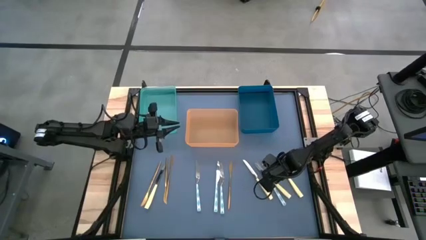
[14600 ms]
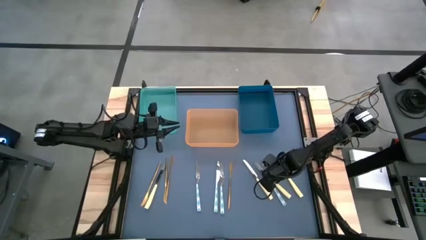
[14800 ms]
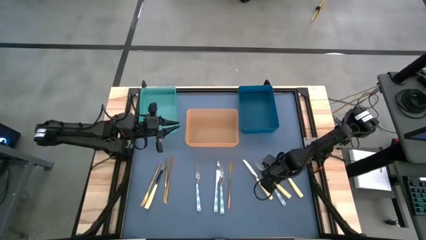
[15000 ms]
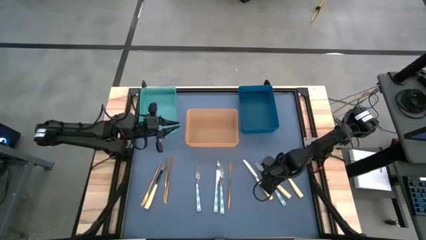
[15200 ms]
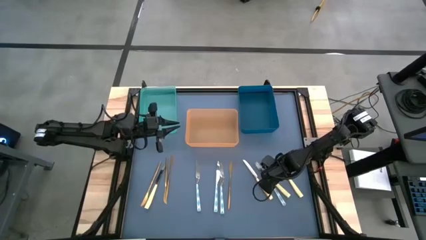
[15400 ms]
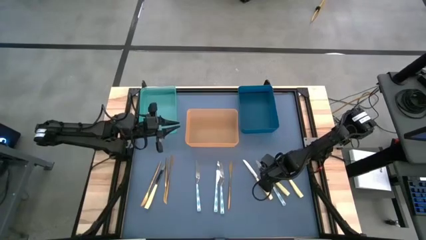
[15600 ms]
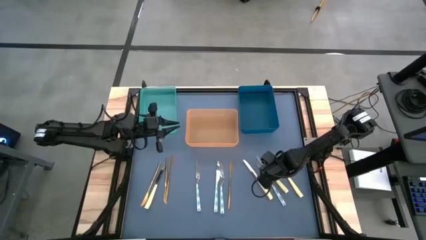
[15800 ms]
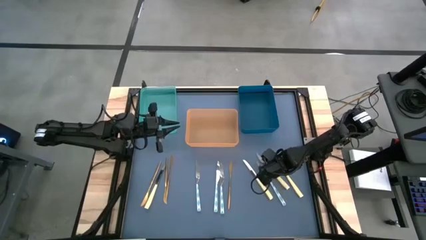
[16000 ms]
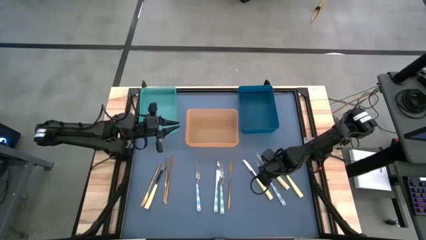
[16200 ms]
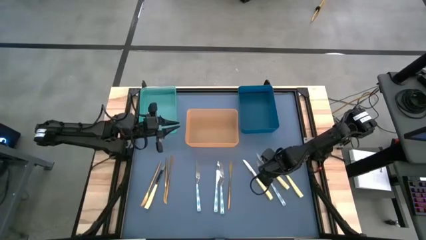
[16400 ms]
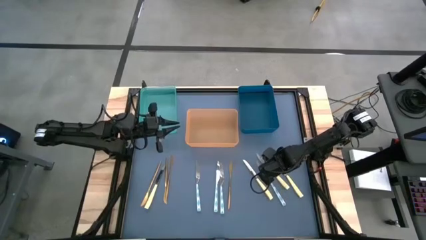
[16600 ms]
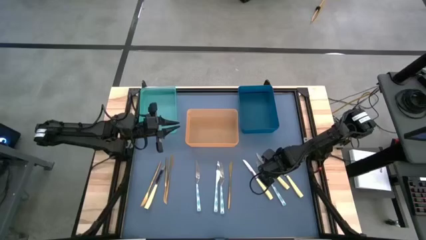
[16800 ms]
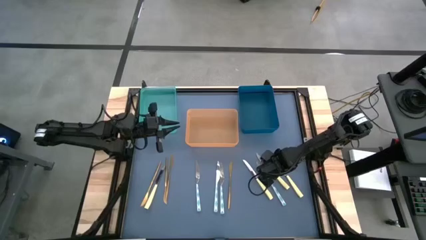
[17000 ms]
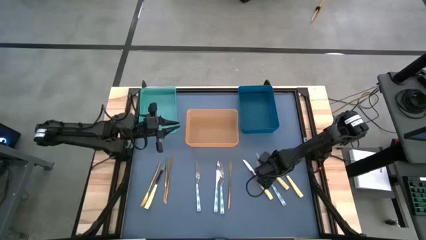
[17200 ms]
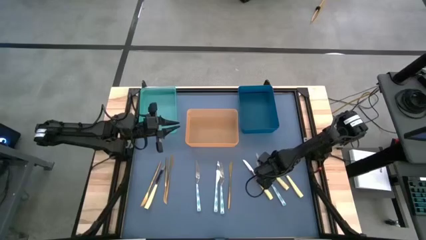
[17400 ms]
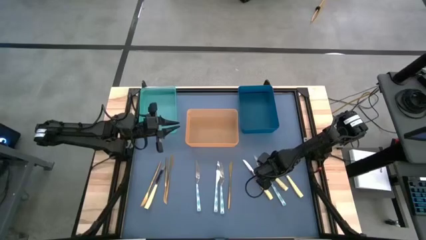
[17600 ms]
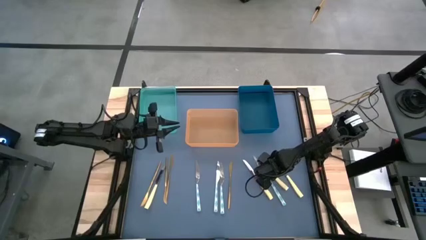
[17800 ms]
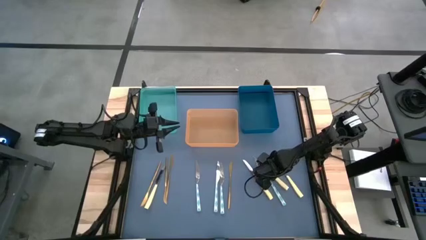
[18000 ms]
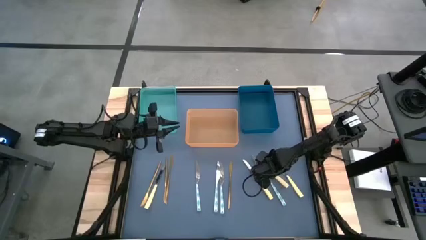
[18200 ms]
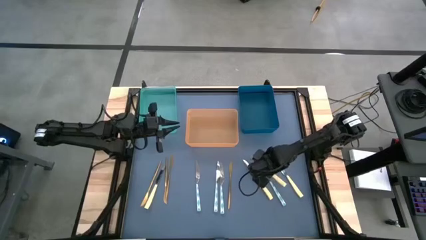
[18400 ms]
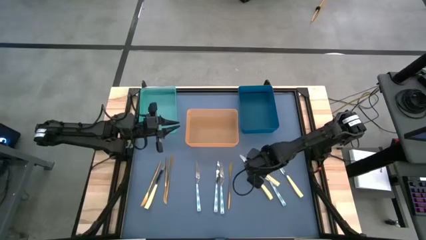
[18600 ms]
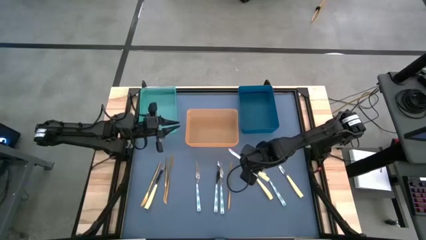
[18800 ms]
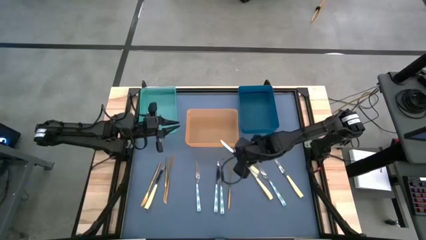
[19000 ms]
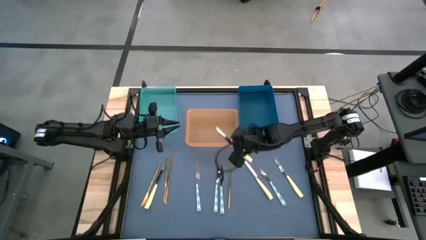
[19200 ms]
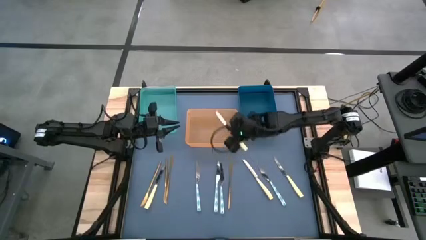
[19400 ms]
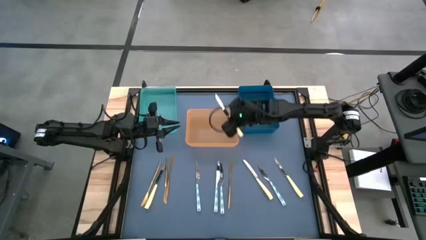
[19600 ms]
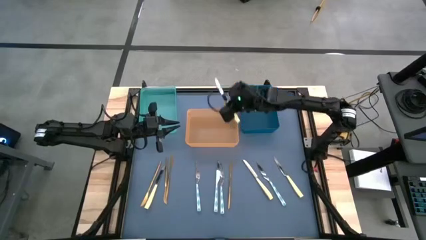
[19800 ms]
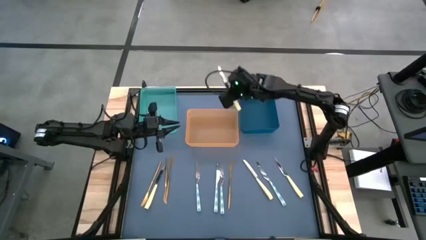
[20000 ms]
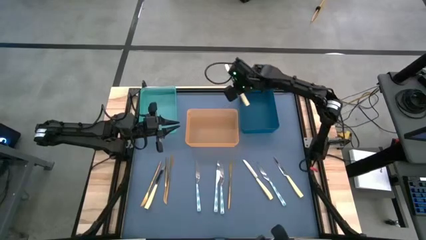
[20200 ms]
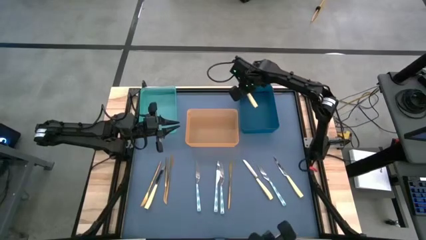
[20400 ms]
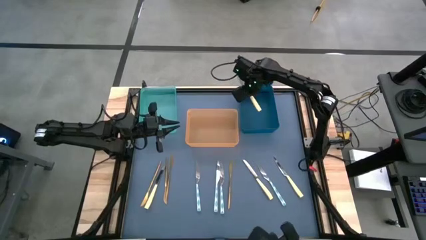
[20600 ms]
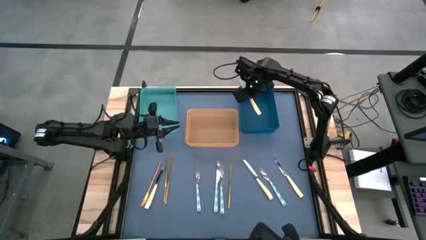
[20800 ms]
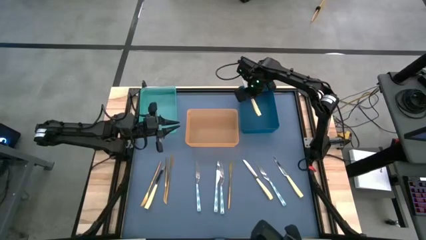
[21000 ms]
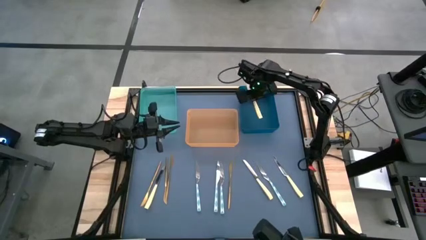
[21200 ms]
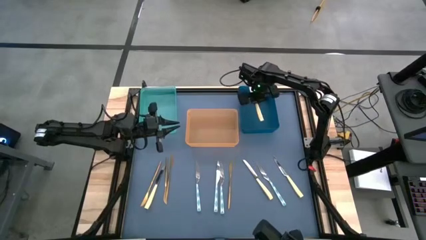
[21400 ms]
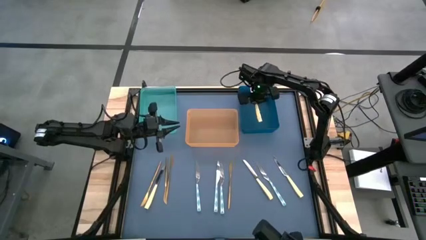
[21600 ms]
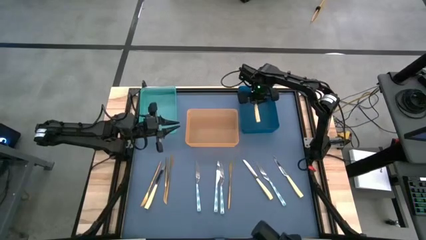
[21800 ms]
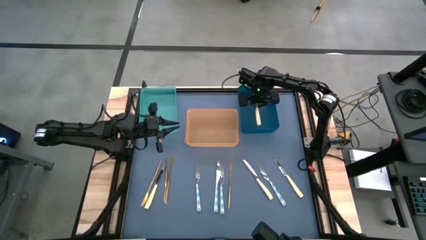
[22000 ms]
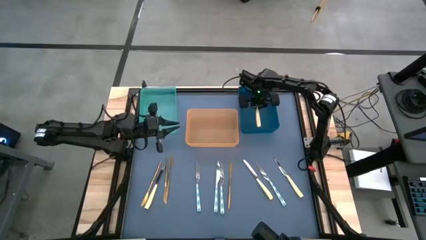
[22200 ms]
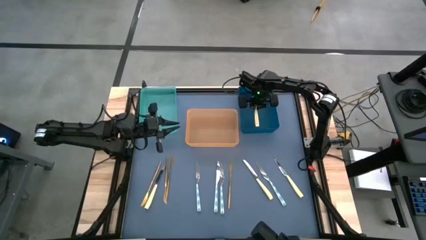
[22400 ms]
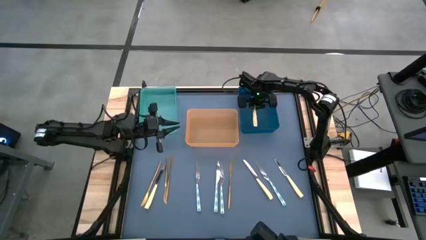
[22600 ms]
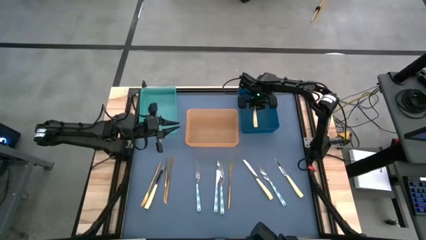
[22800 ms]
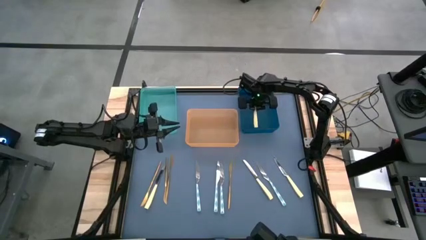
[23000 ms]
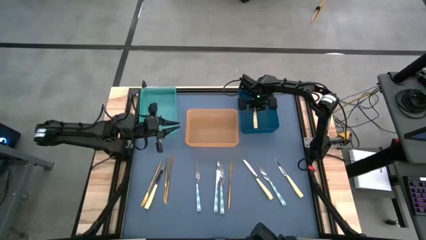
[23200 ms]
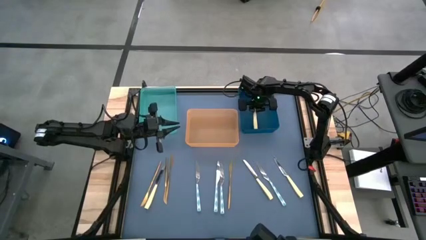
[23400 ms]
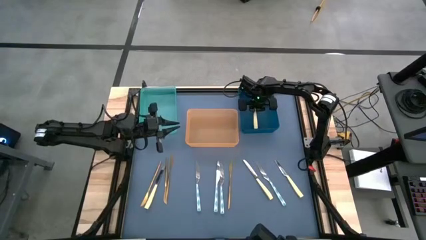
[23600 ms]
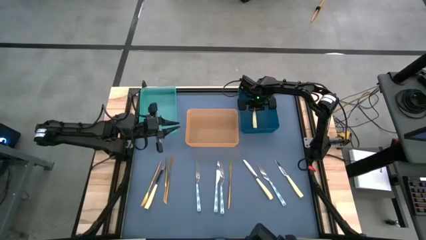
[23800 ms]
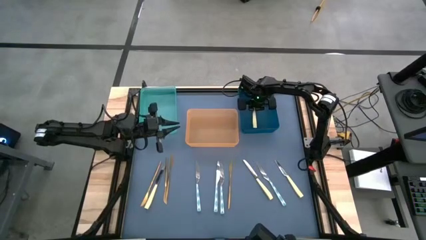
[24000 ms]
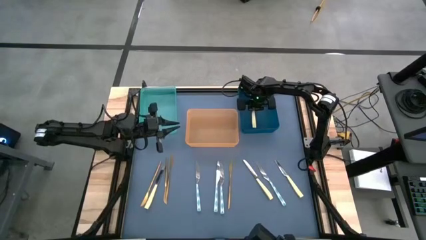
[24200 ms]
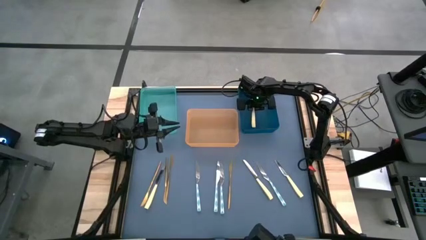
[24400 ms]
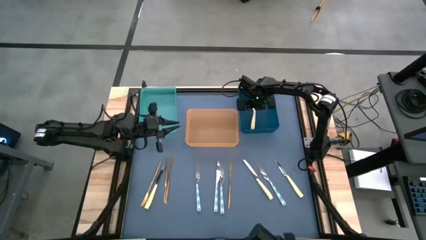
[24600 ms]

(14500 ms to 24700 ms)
Task: Sort silverware by color (type)
Put the yellow knife into the blue bin

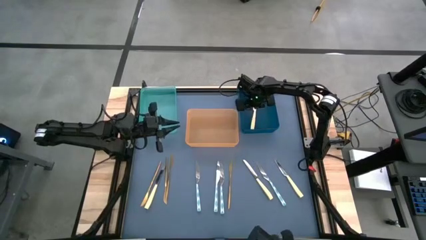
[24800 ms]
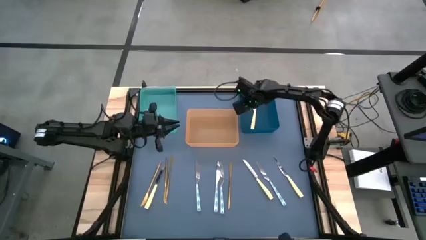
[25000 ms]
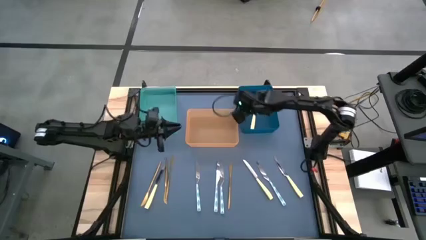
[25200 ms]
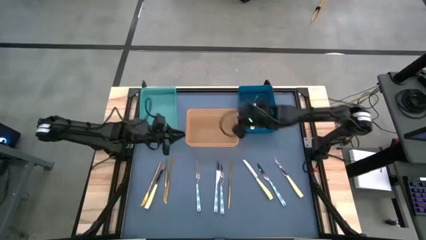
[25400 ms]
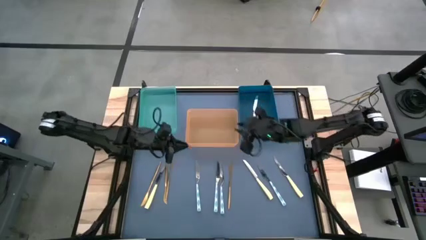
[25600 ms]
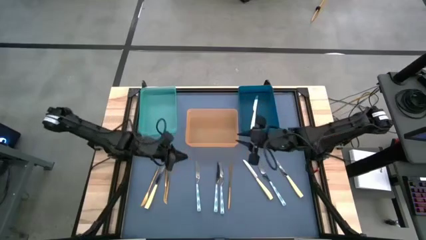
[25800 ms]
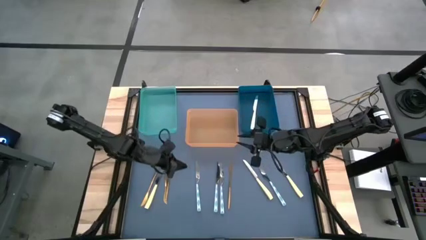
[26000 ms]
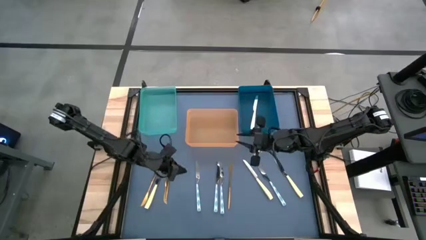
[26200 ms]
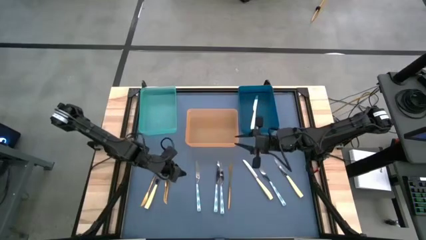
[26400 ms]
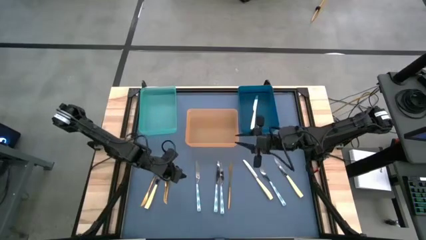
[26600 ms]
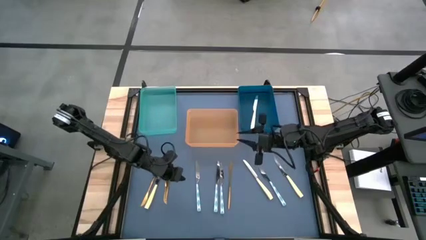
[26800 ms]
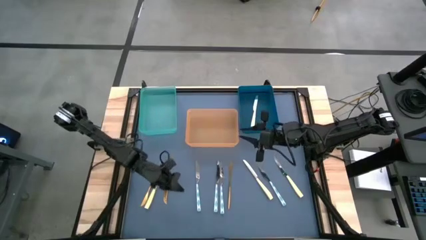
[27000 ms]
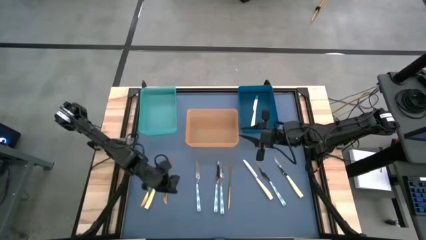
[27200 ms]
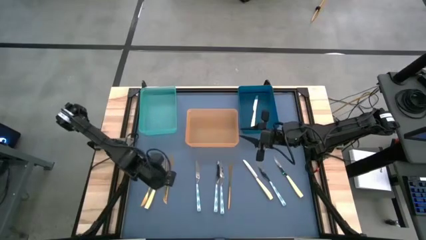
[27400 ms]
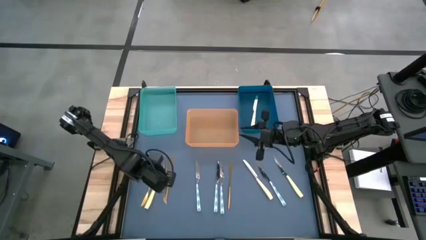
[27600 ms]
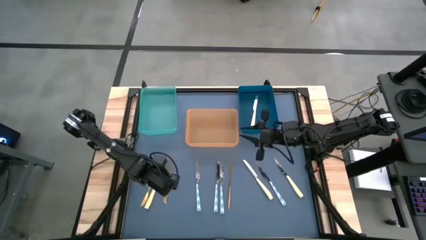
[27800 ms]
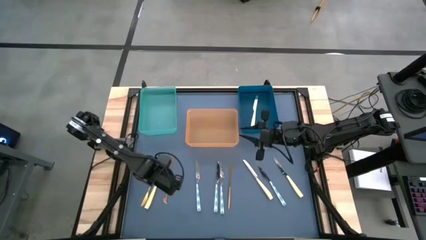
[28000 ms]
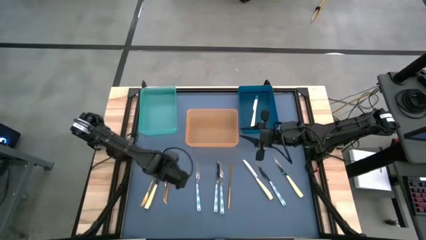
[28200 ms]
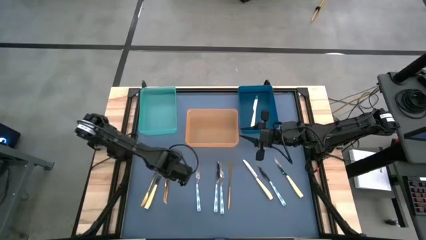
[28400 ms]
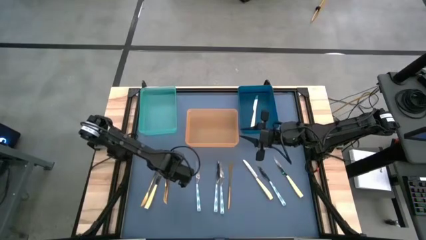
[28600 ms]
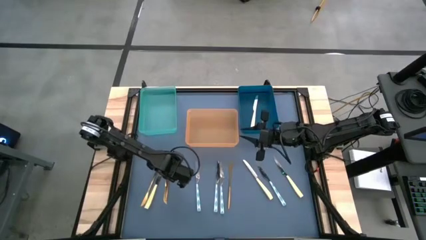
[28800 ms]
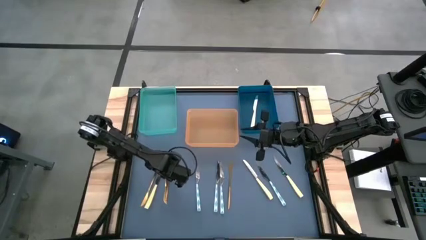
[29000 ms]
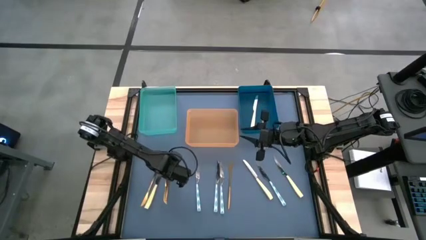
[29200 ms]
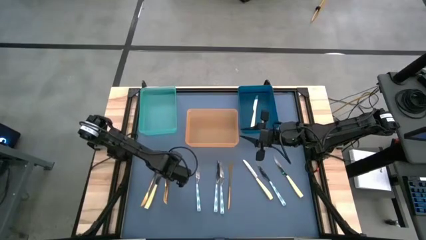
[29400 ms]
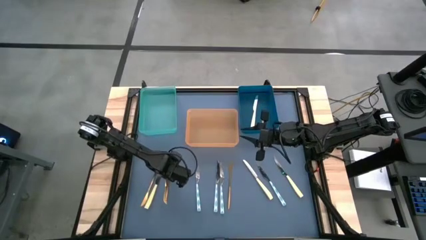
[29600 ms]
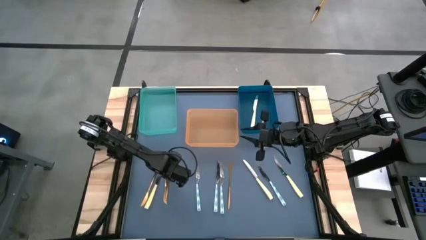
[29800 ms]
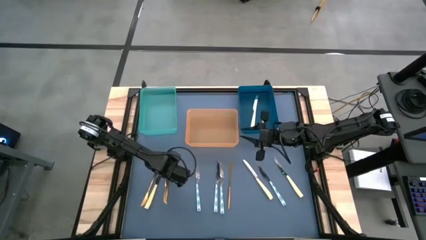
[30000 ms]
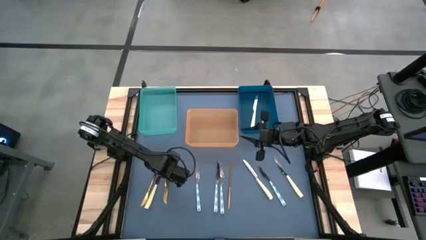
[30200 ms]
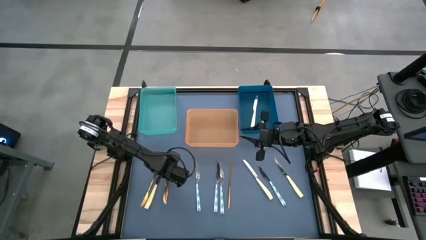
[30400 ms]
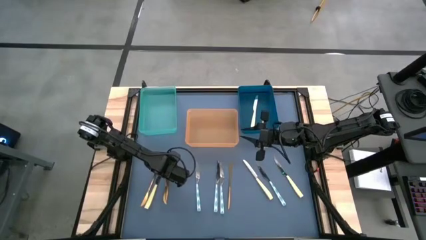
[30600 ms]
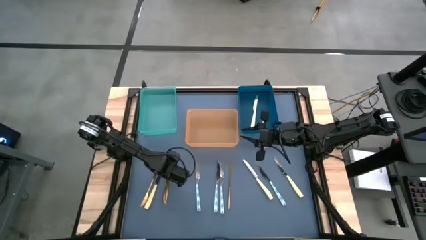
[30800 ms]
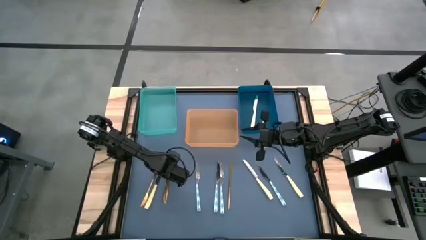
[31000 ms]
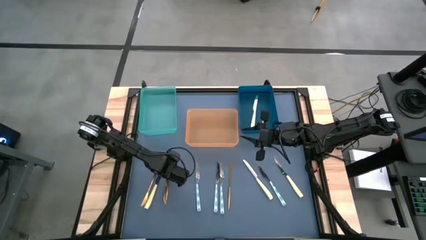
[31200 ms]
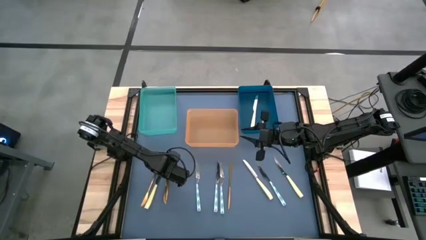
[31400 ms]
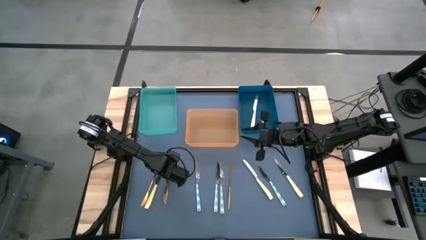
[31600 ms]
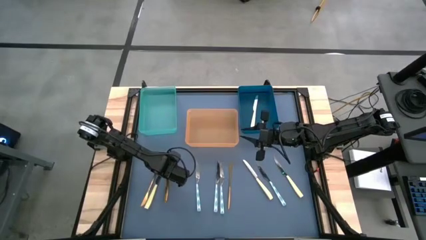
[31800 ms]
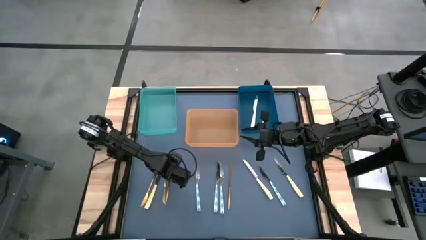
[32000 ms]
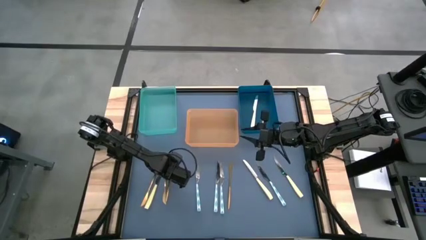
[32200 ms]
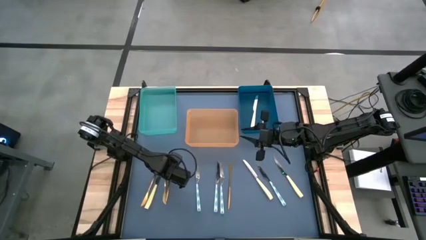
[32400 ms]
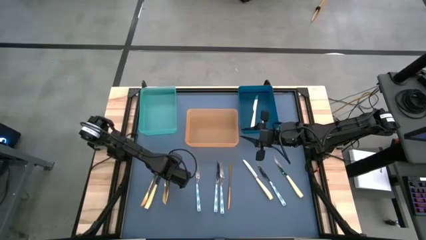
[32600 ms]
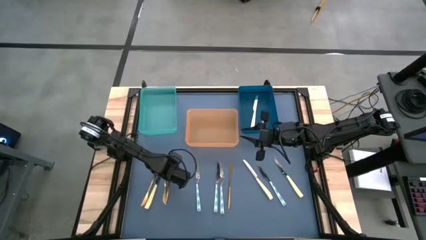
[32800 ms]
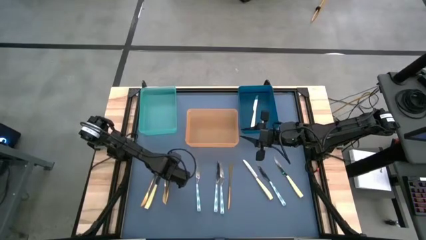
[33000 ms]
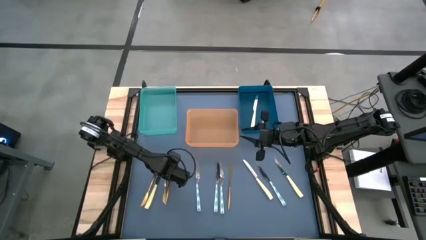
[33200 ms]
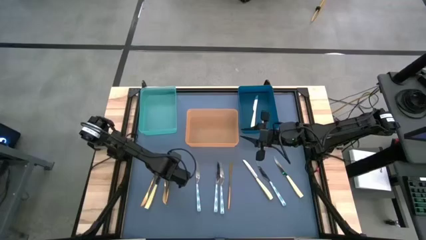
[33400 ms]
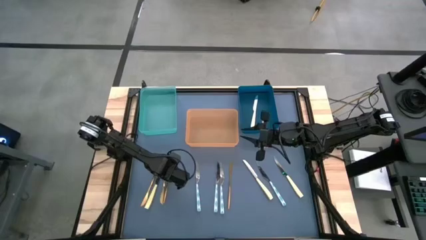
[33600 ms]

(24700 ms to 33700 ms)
Put the gold knife into the green bin
